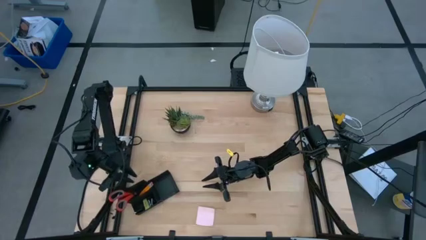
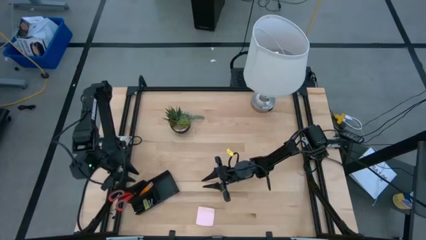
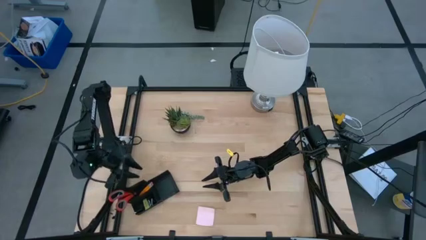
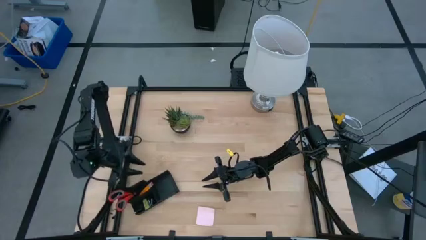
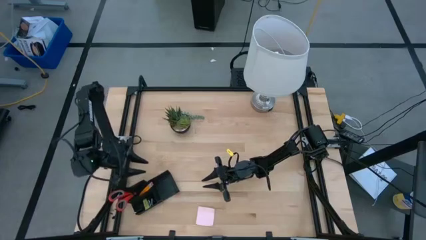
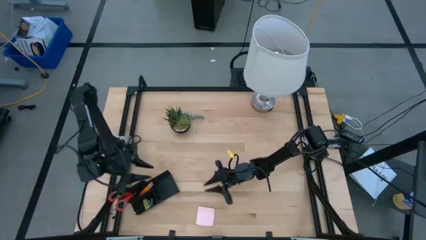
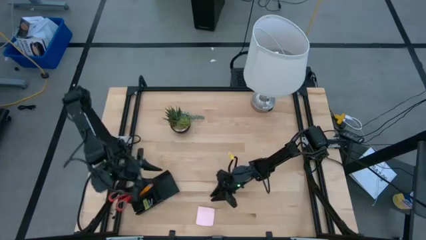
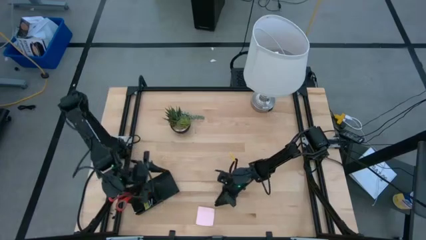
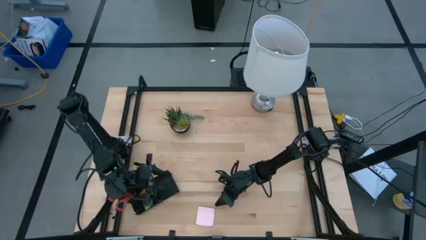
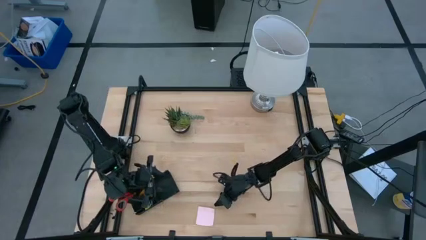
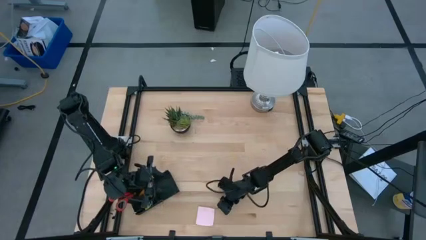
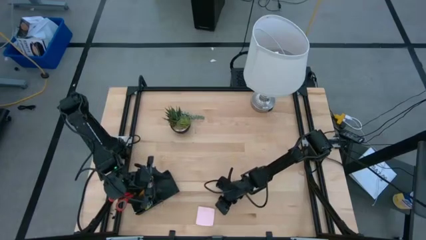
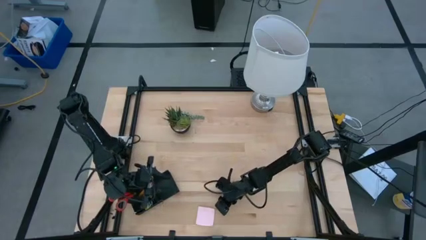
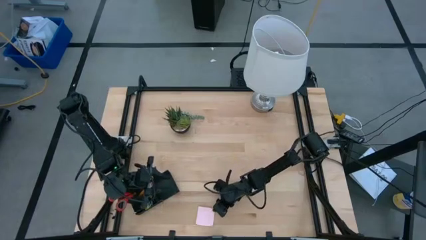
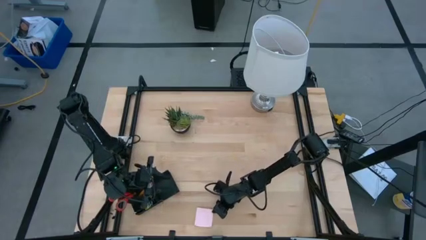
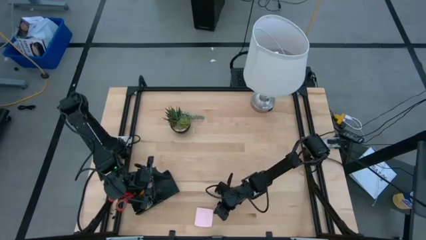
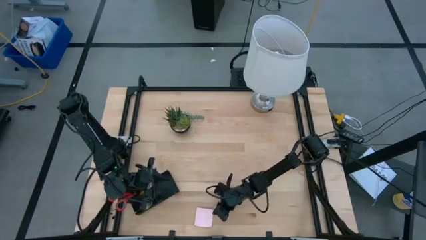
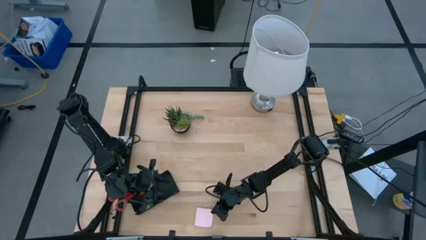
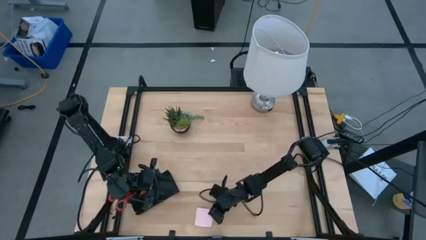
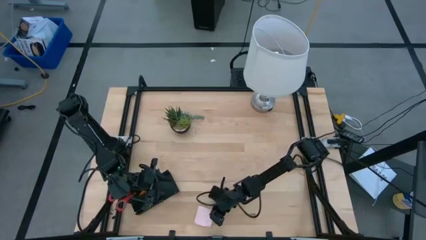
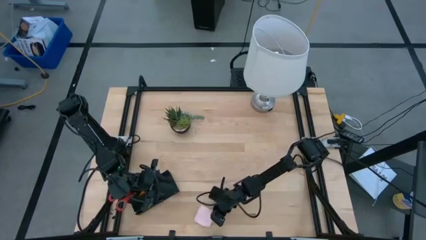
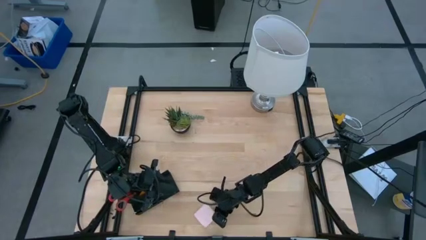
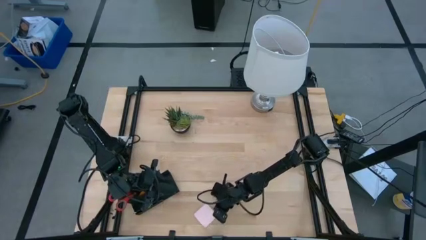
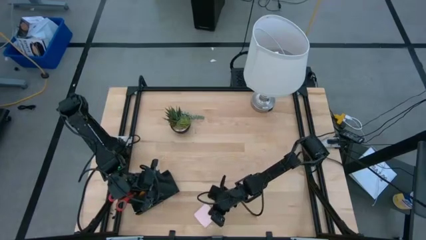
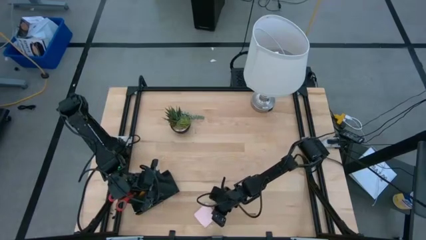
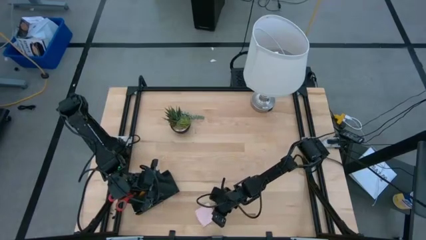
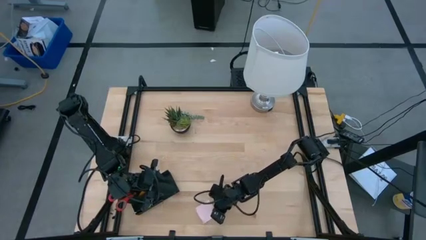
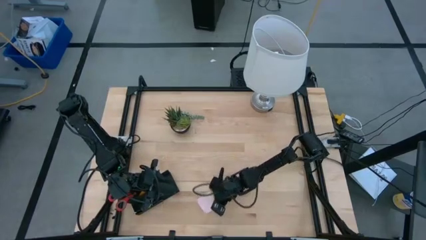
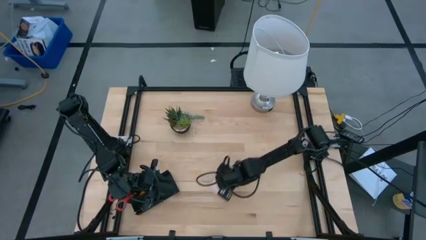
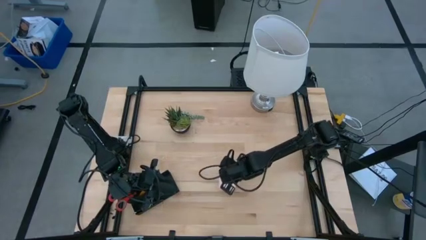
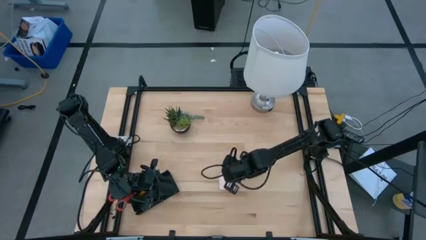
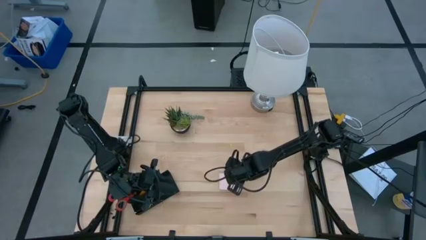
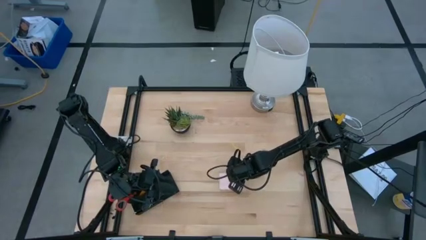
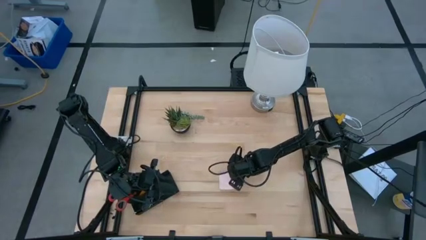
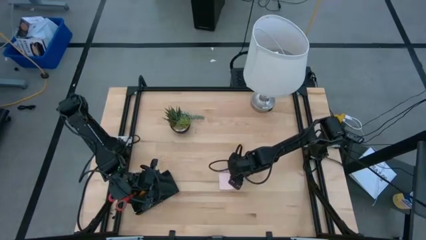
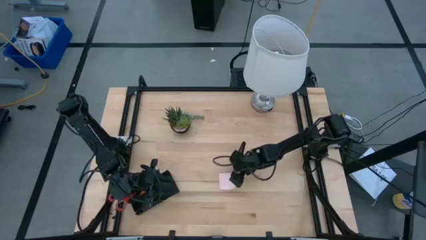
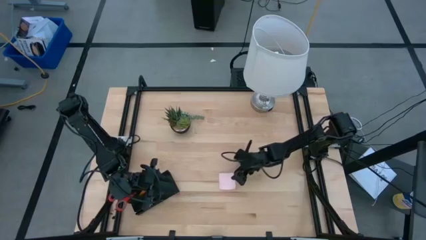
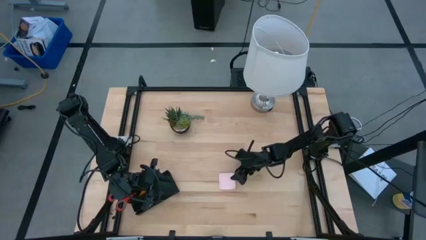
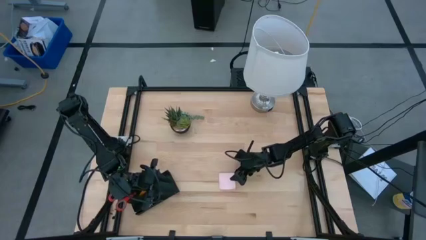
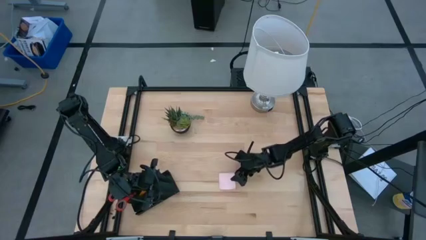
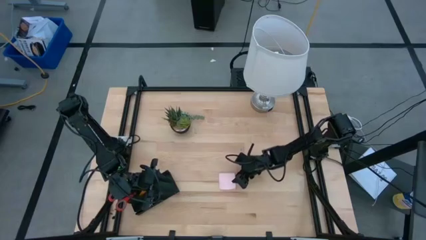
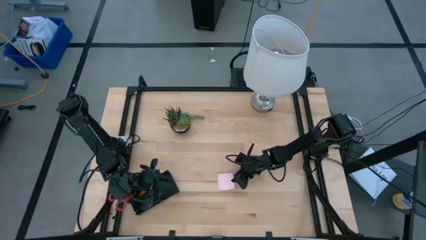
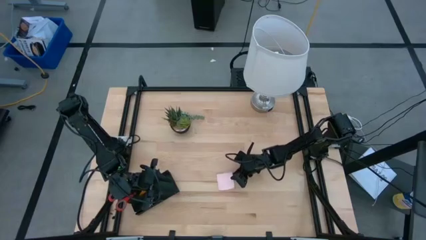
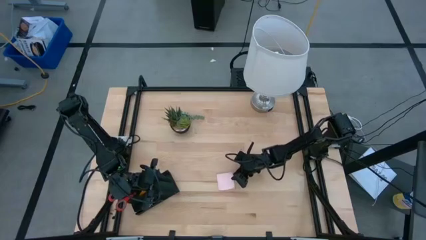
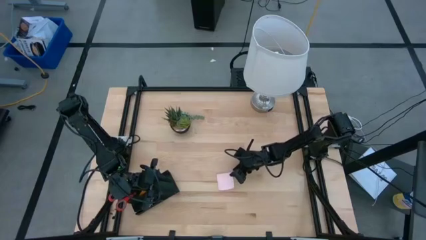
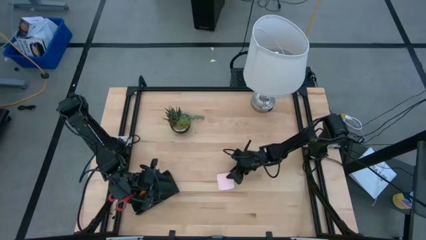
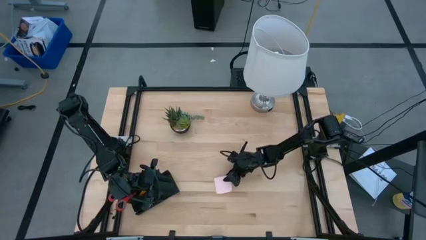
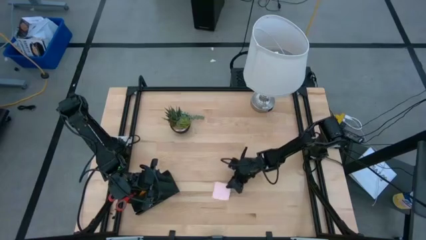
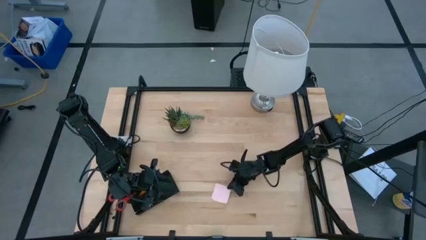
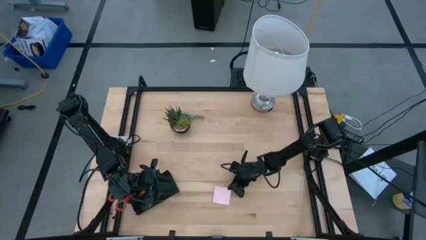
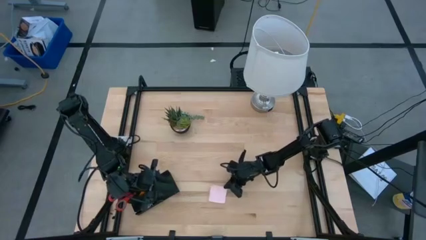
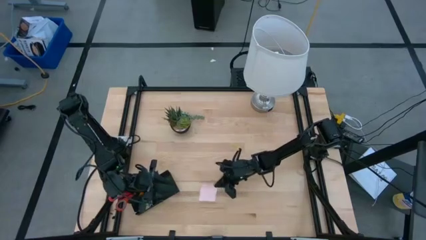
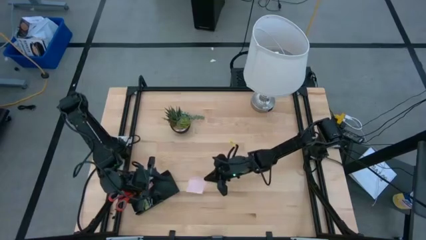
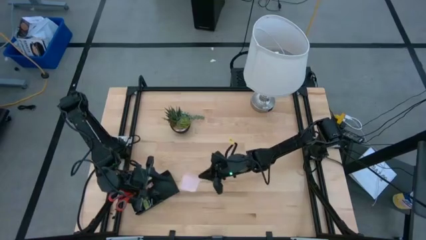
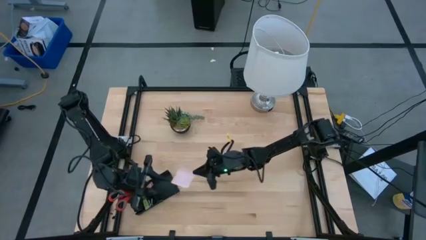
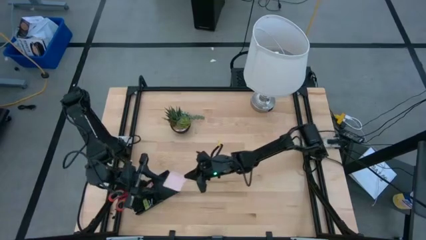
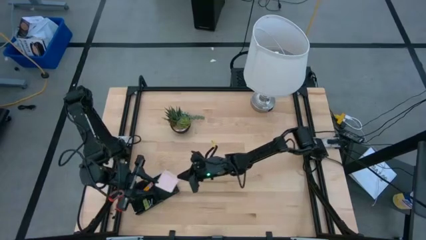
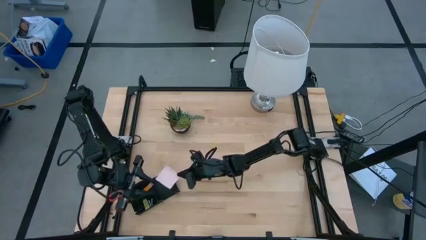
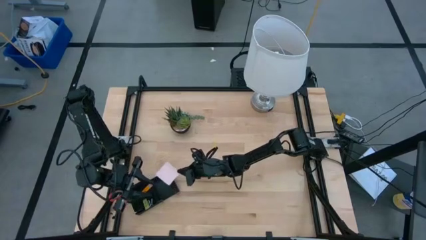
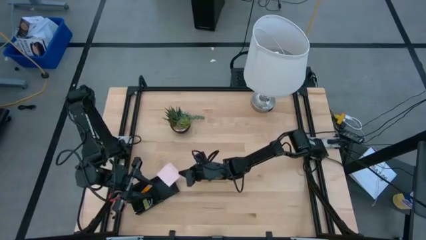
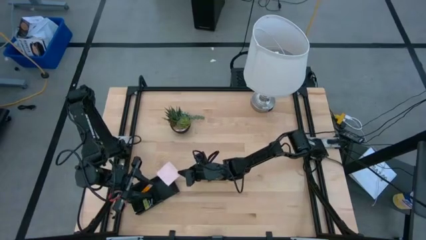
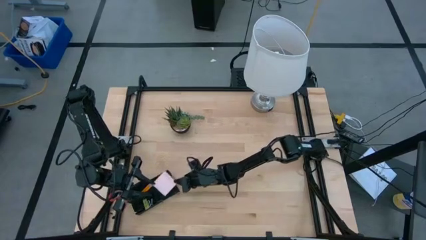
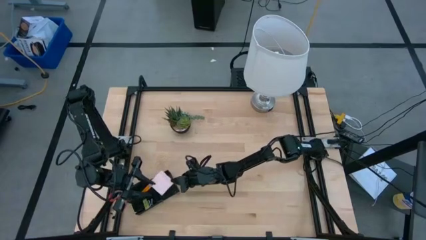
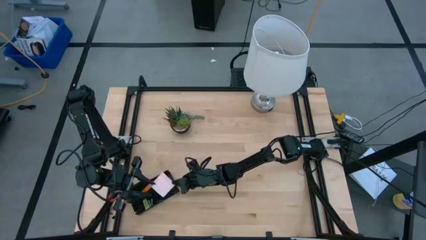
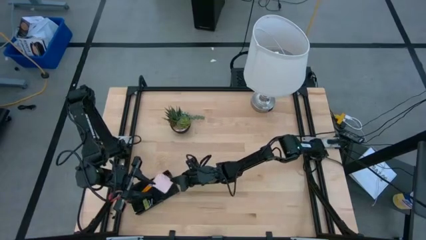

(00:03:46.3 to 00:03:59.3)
Task: Pick and place office supplies into organizer
Put the sticky notes into the right section of the desk organizer

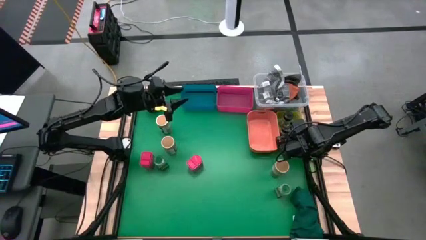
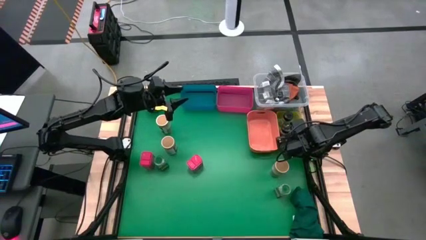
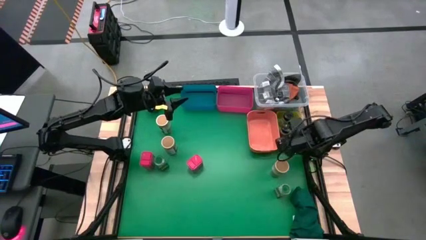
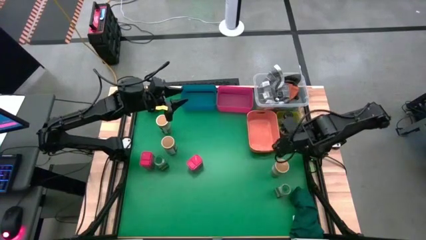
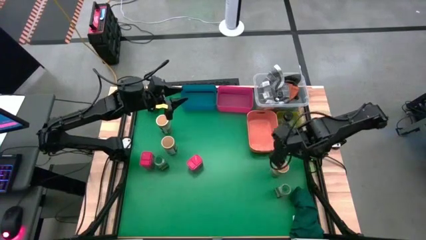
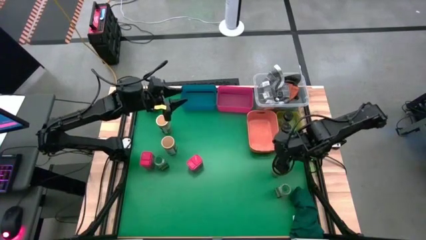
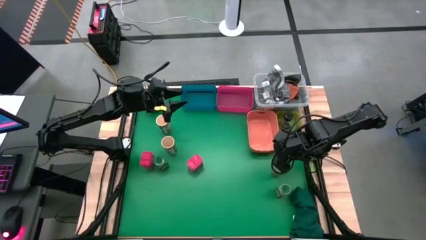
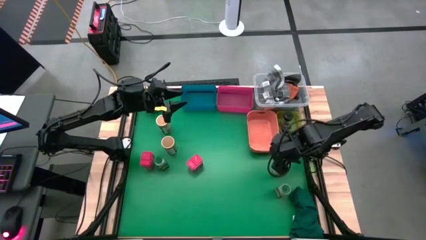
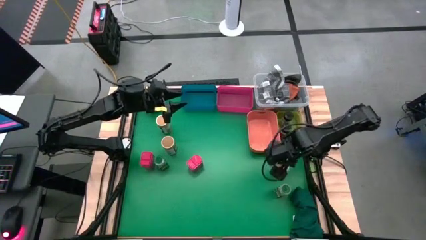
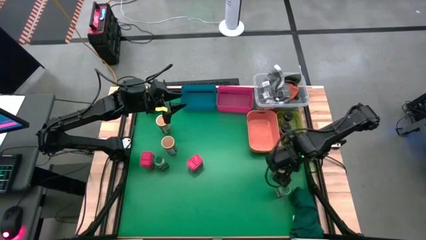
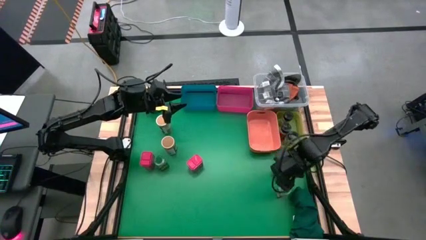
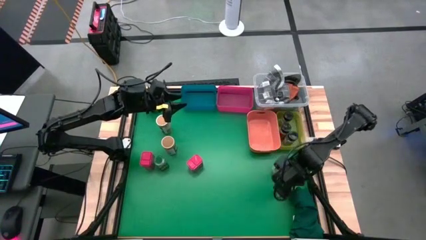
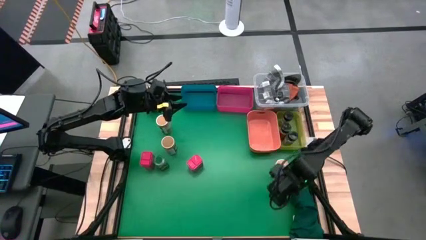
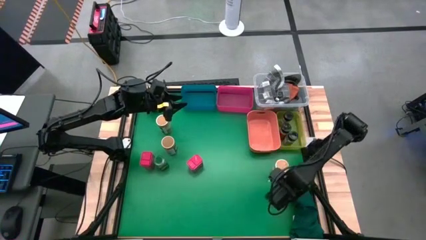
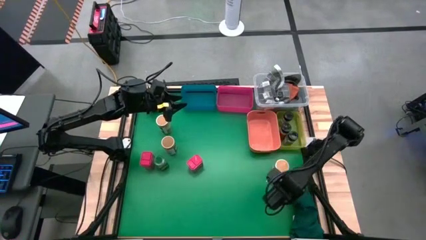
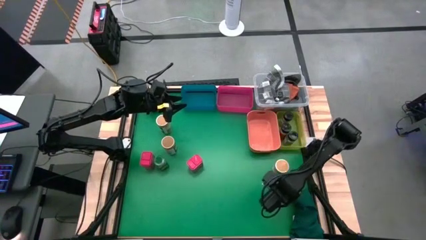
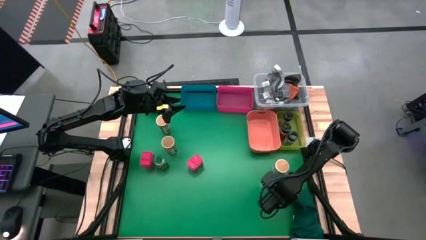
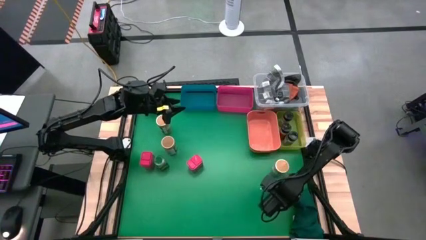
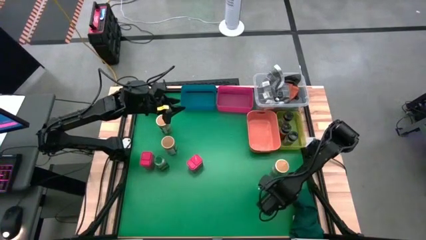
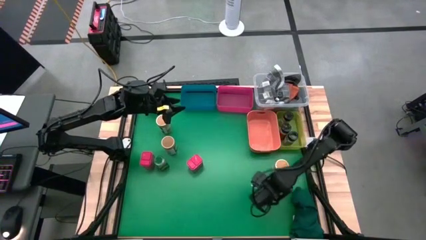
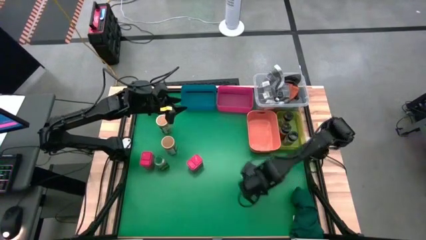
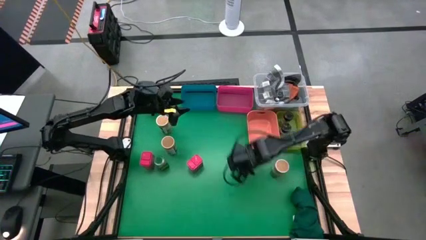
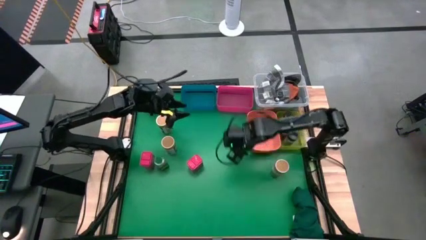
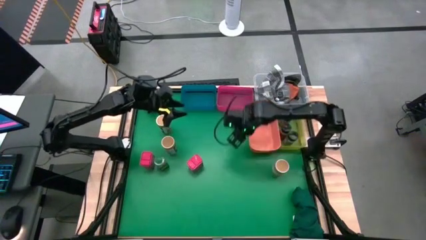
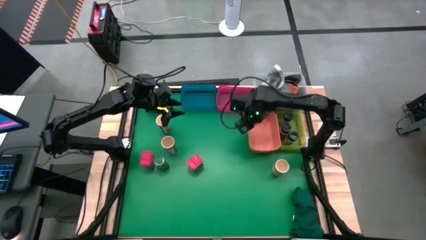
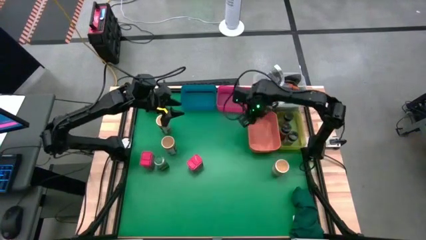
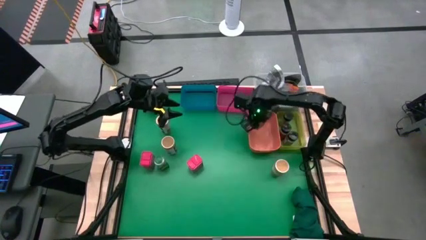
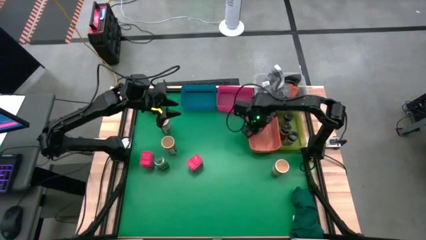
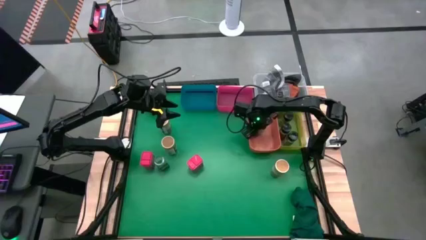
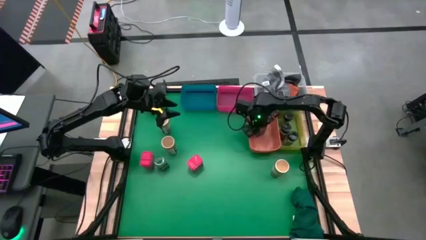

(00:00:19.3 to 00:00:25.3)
Task: Sort spices by type
Put the bottom green seasoning bottle into the orange bin
